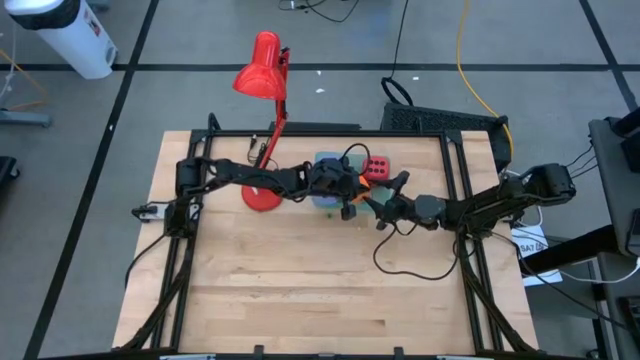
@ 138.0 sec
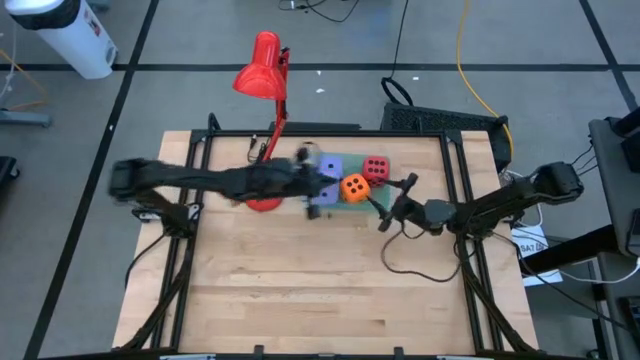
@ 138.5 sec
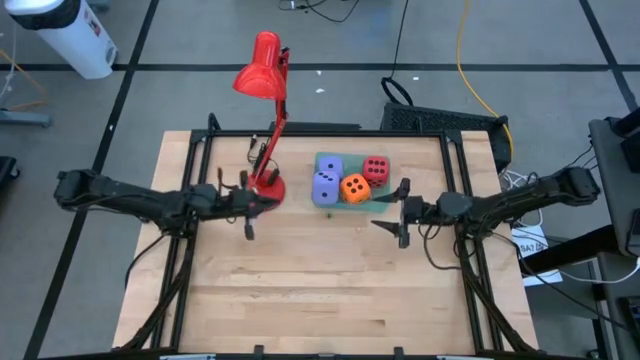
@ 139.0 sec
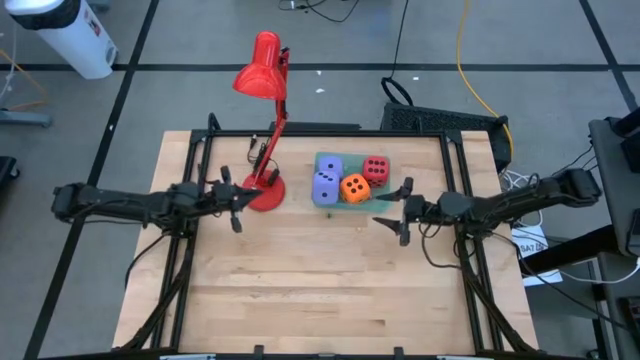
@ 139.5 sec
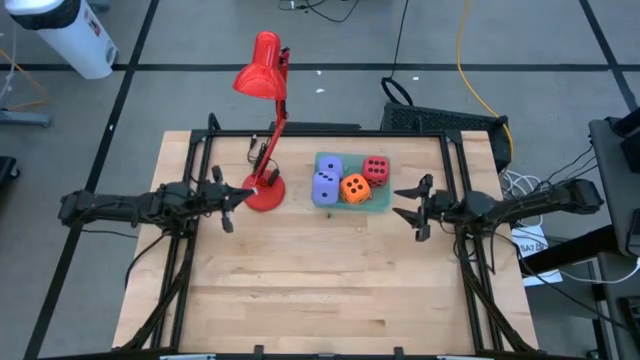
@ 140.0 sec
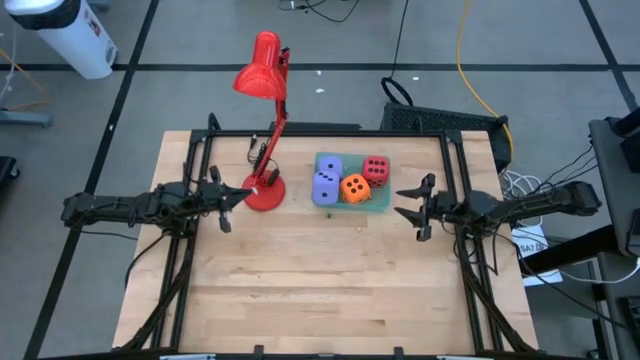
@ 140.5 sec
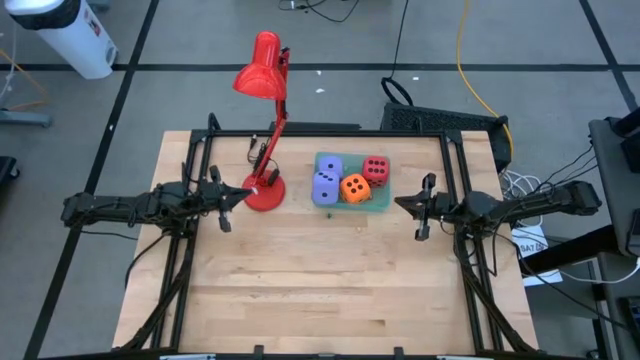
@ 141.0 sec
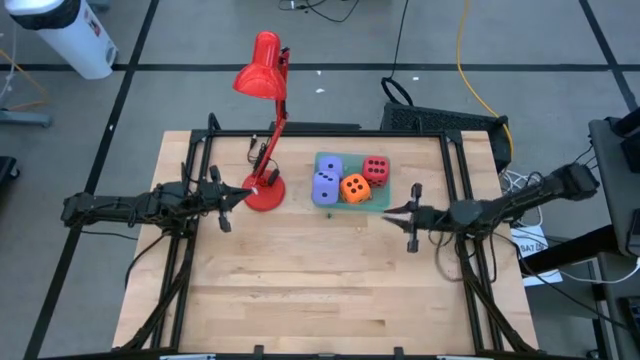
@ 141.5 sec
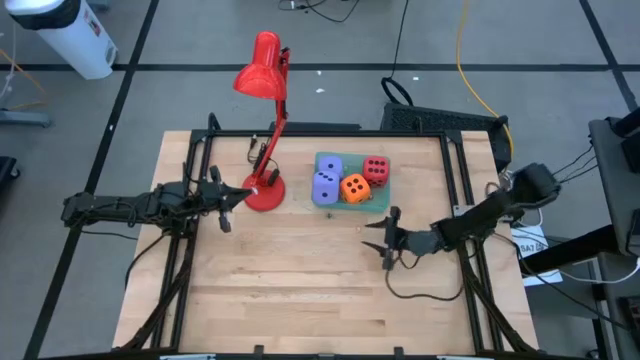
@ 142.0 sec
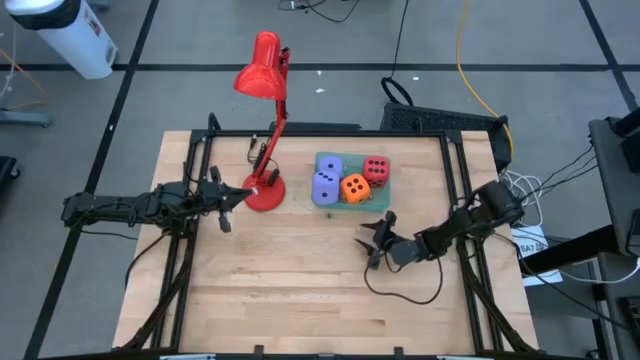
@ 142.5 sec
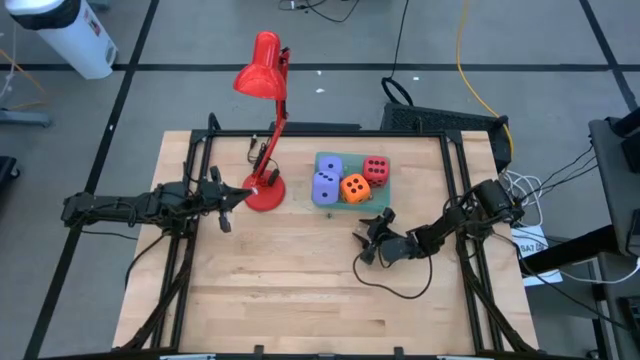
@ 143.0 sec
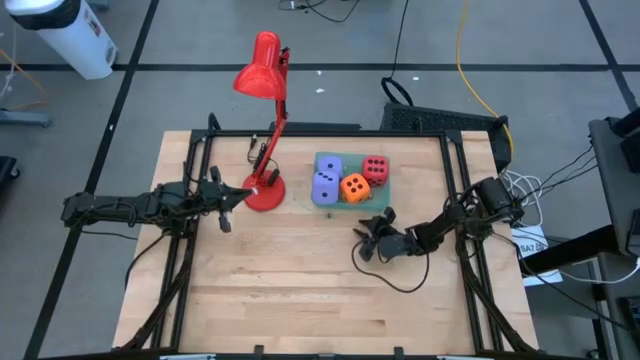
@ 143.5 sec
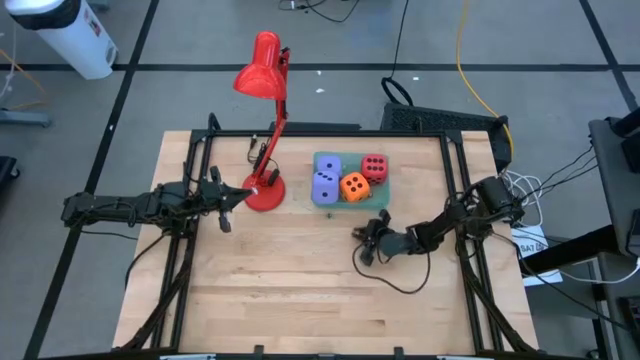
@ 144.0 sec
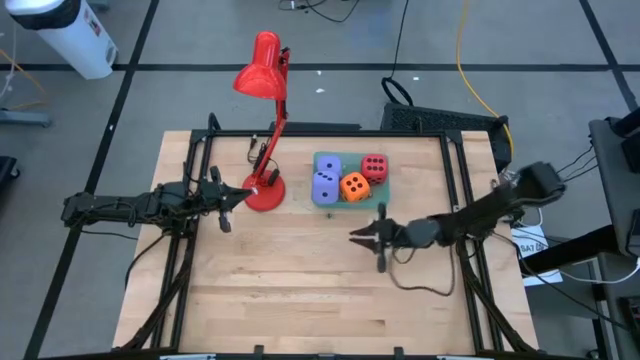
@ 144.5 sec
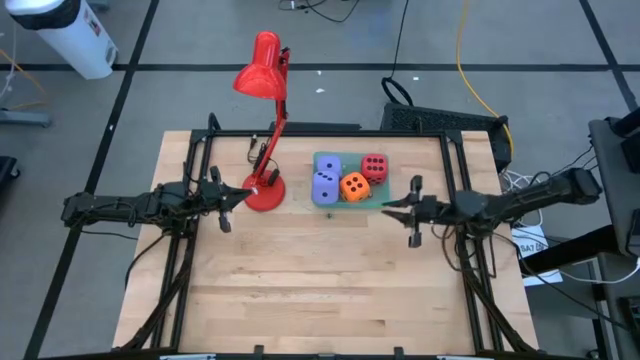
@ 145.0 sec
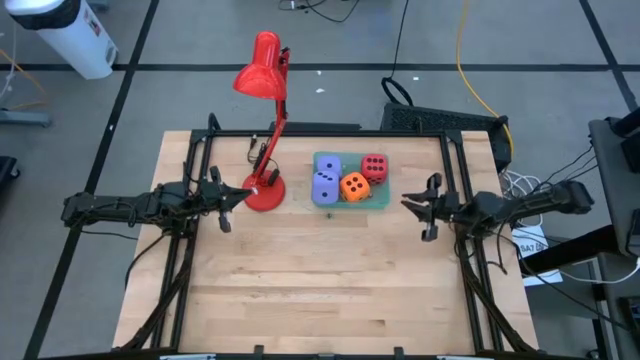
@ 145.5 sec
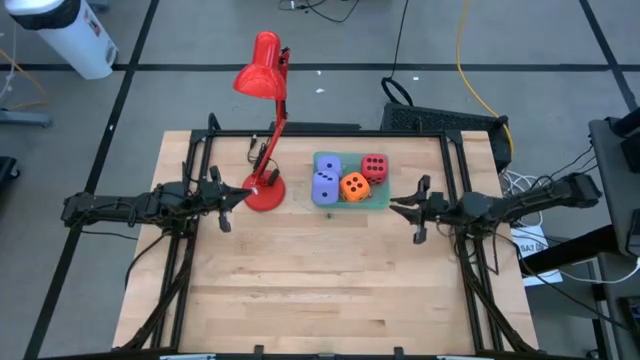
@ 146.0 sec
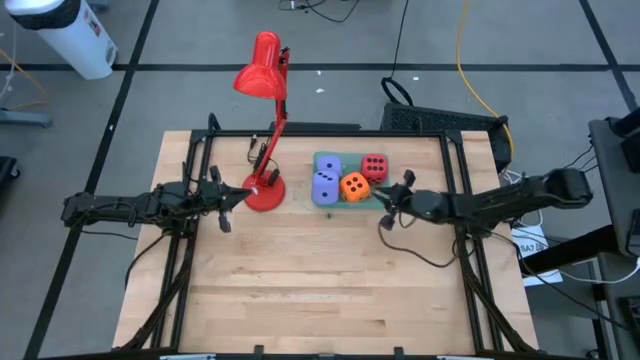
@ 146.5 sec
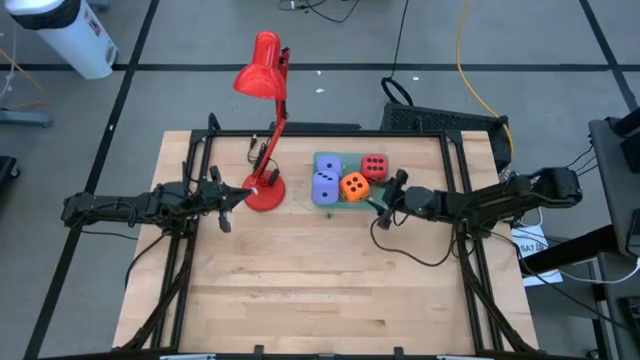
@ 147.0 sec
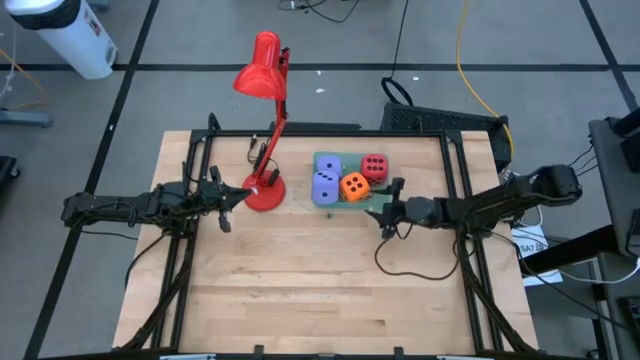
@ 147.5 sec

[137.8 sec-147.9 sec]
Task: Pick & Place Dice
Put the yellow die into the green bin

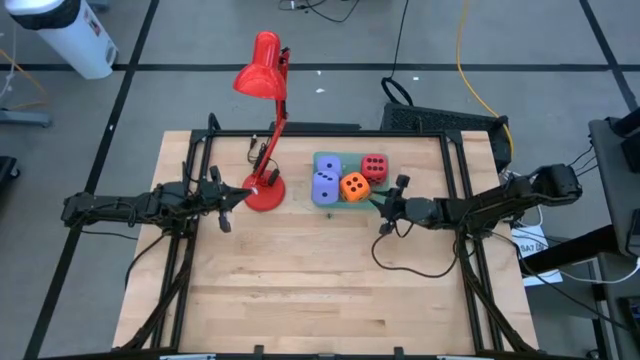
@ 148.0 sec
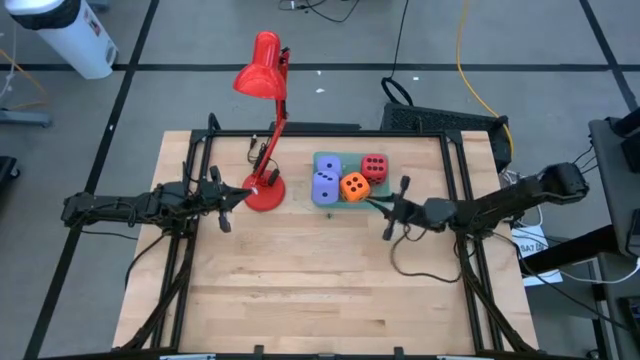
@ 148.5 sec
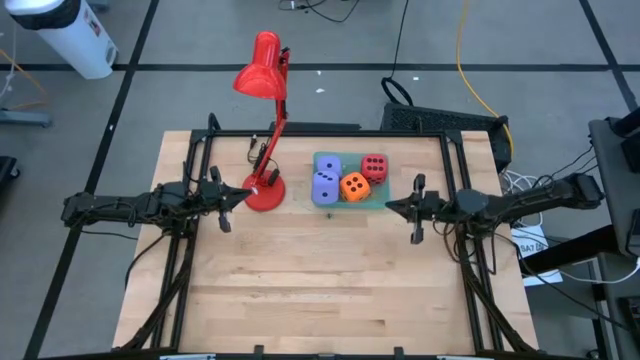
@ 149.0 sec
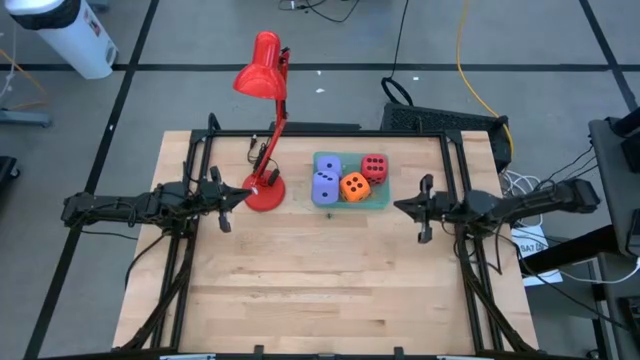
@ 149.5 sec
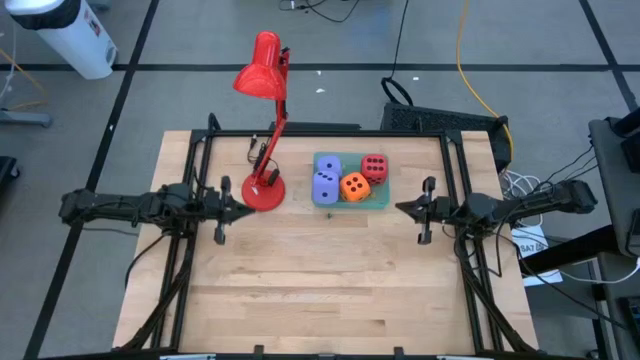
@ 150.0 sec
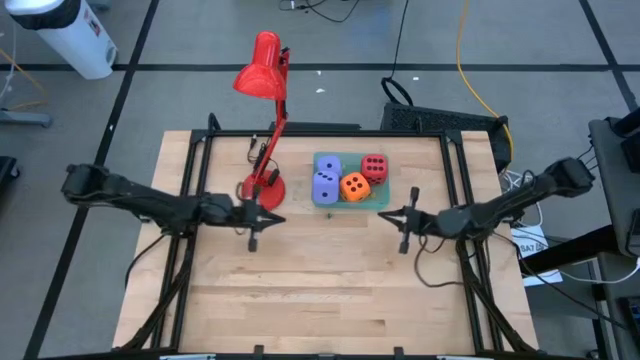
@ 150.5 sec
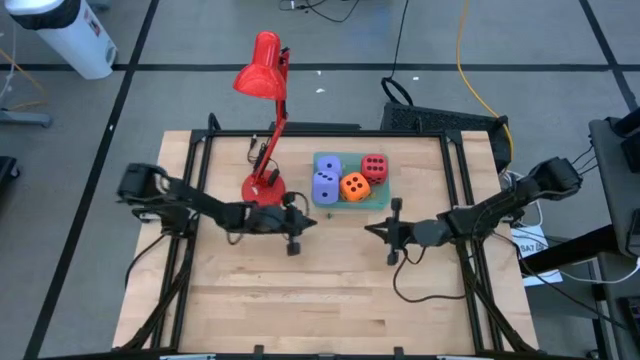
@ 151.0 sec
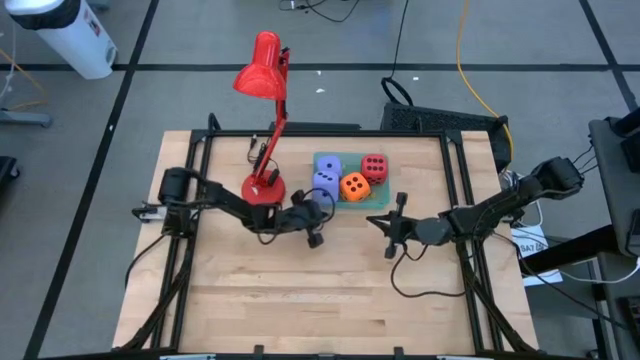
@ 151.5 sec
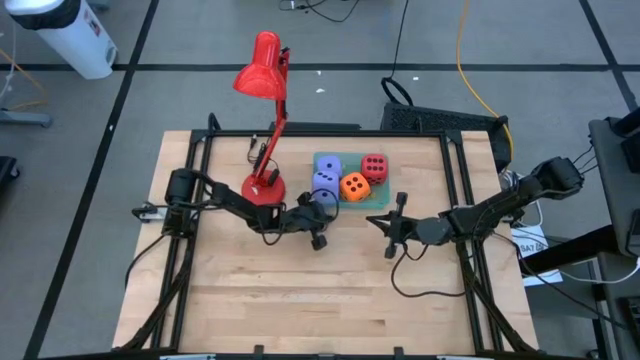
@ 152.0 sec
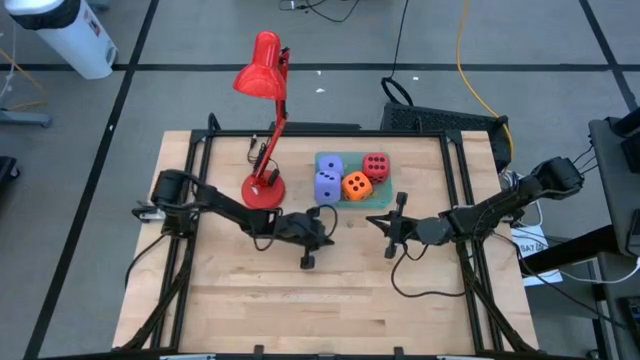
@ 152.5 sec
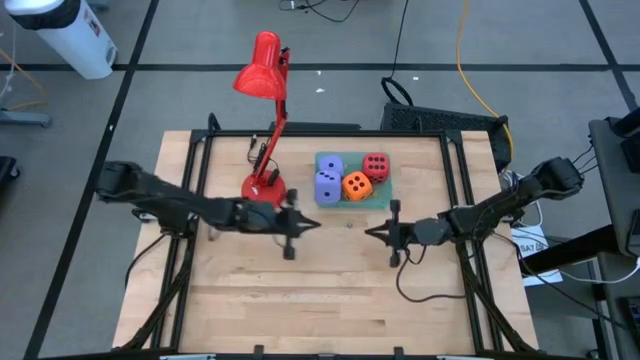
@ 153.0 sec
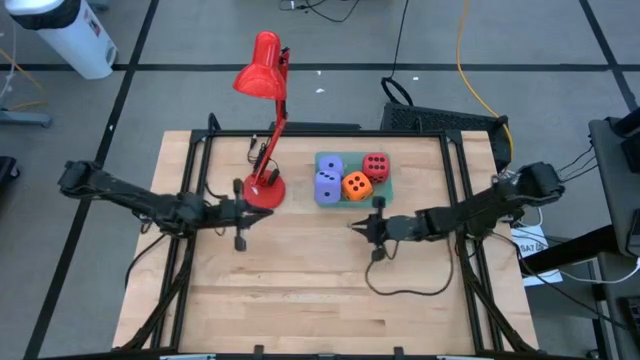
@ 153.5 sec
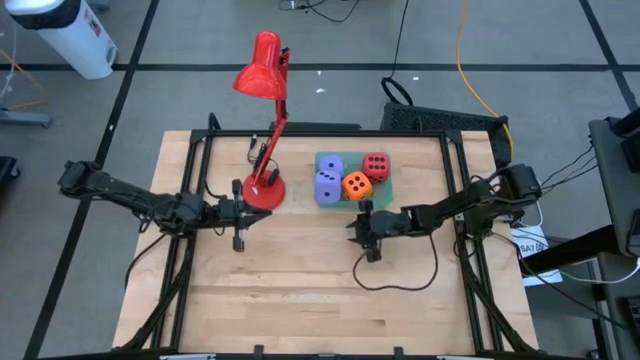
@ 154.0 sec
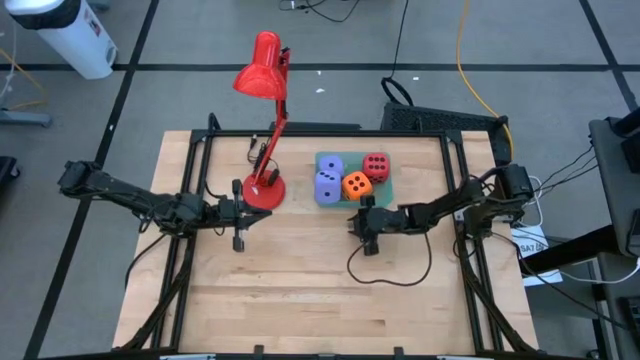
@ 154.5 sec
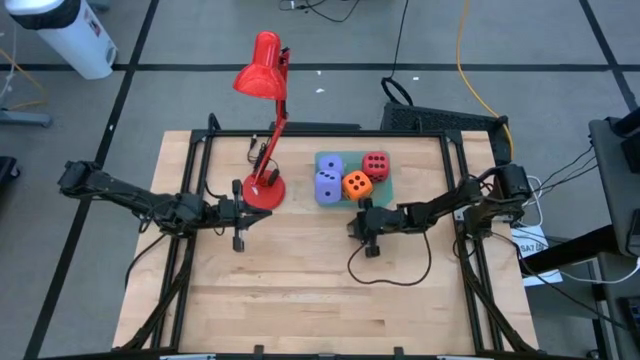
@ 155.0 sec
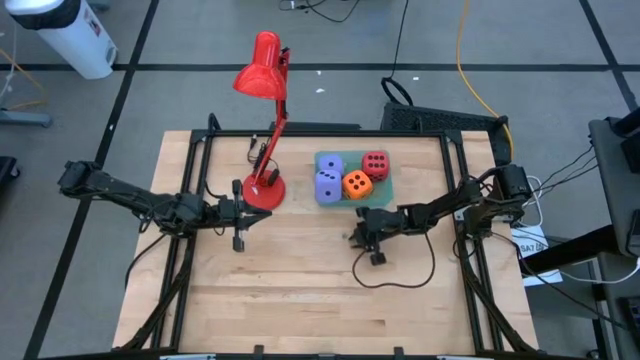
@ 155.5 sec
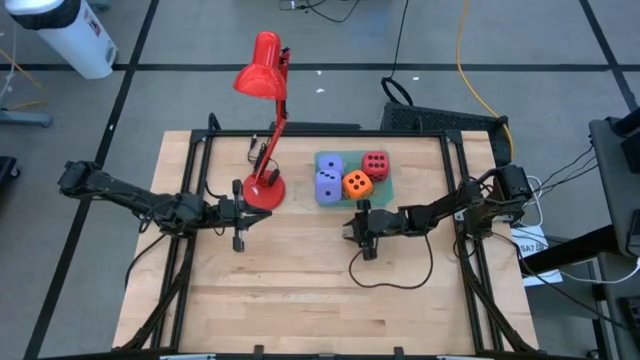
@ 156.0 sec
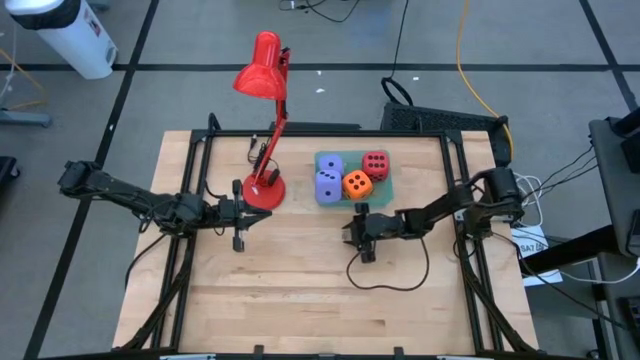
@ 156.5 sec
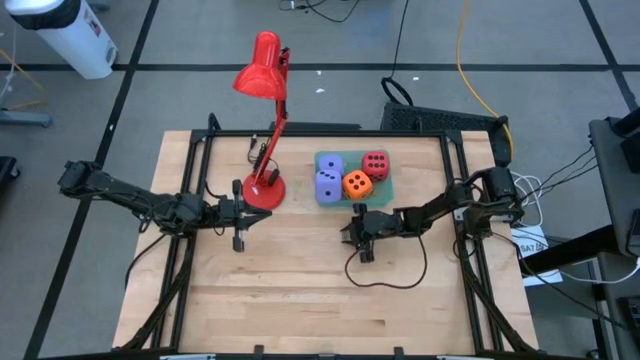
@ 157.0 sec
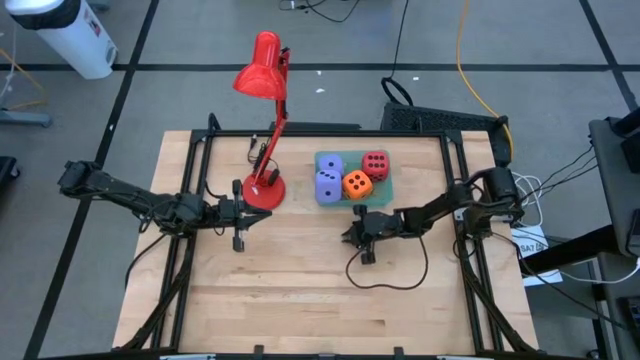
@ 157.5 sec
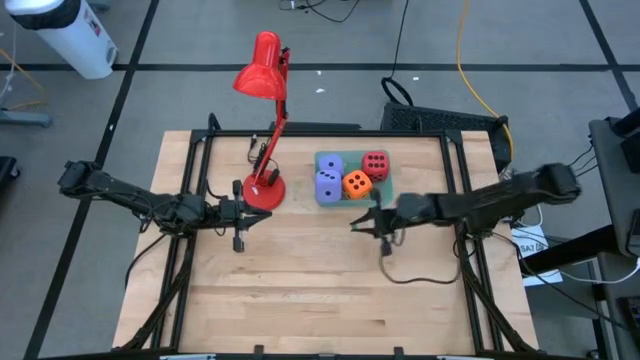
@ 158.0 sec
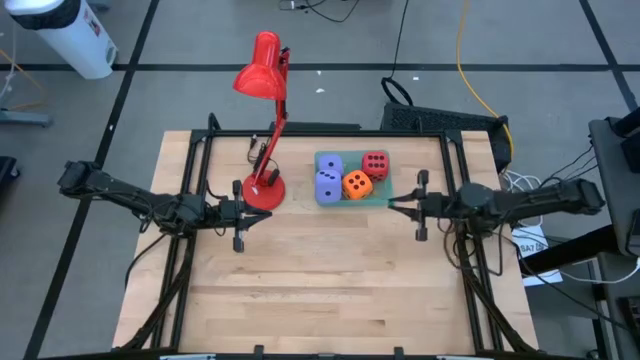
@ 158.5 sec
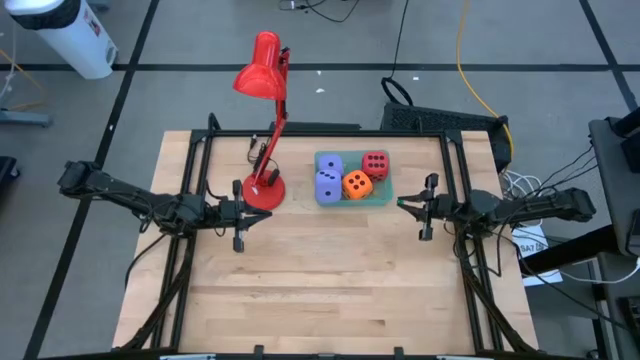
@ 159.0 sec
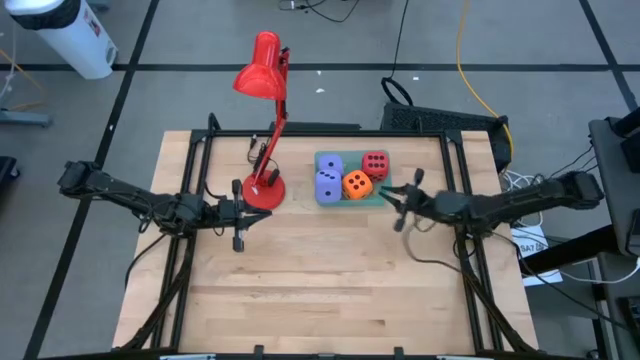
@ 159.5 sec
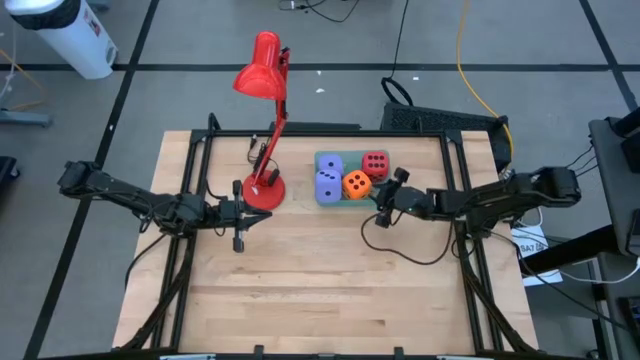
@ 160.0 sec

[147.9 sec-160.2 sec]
Put the green die into the green bin
